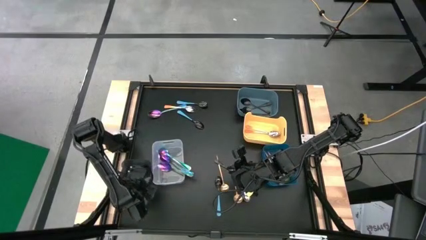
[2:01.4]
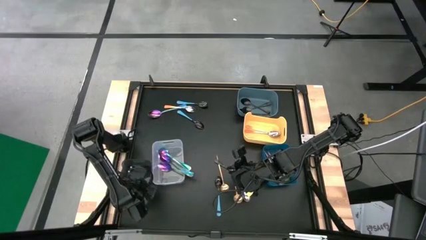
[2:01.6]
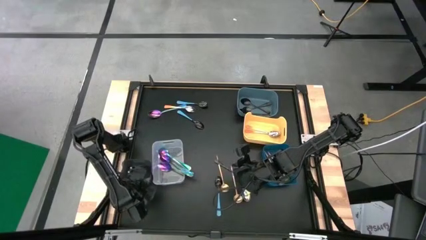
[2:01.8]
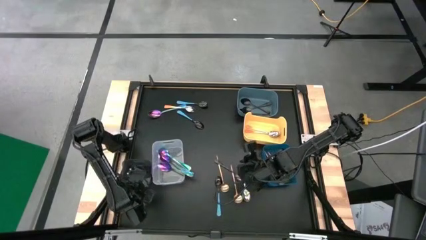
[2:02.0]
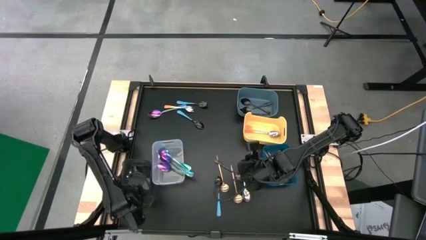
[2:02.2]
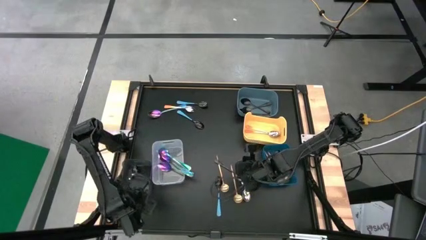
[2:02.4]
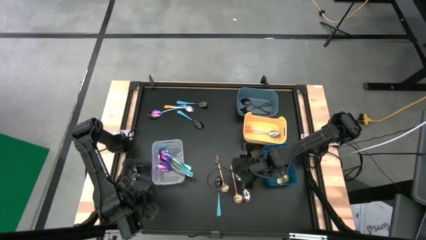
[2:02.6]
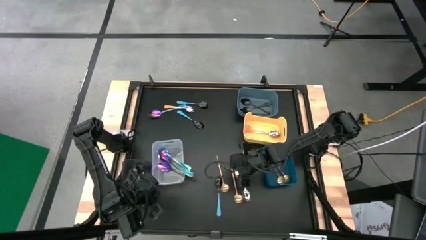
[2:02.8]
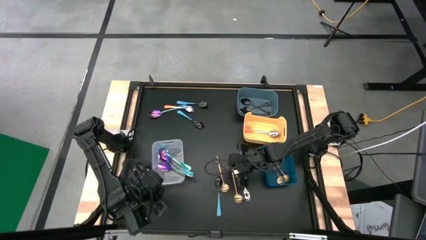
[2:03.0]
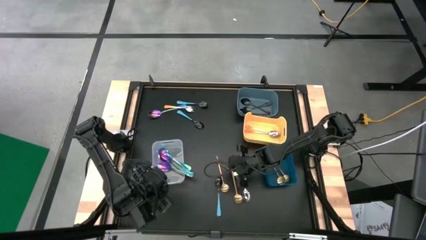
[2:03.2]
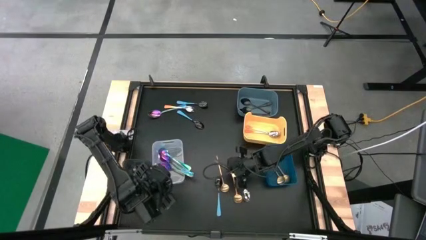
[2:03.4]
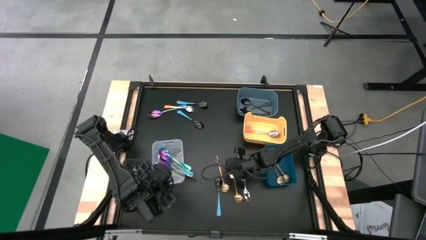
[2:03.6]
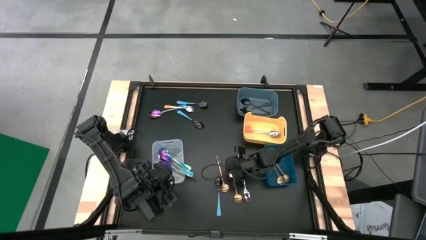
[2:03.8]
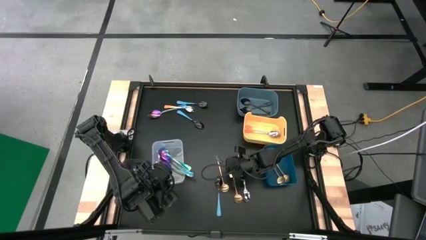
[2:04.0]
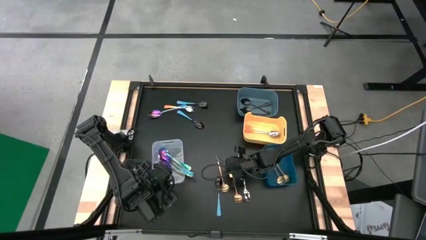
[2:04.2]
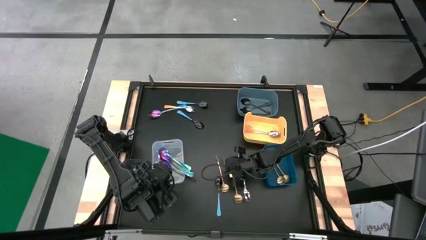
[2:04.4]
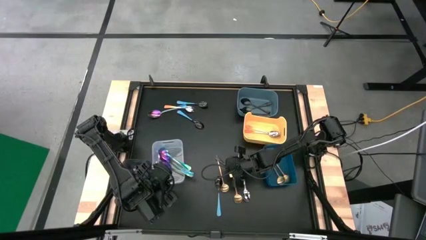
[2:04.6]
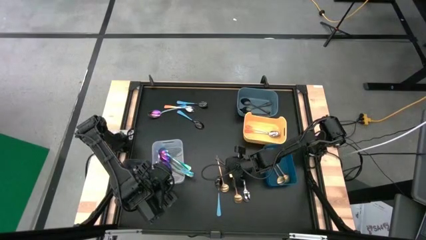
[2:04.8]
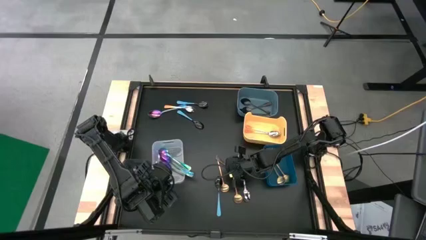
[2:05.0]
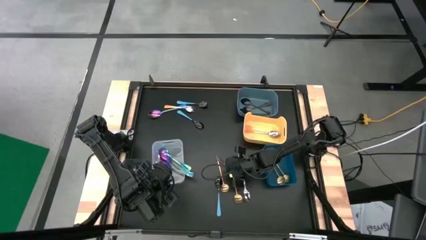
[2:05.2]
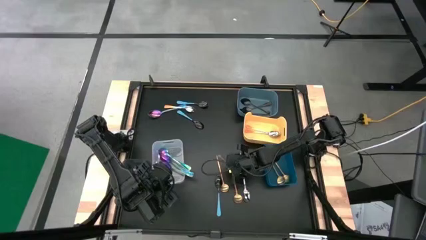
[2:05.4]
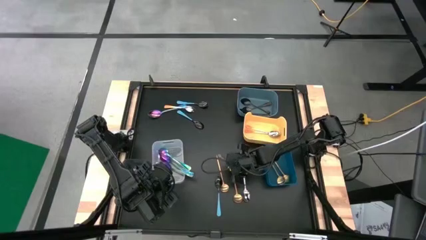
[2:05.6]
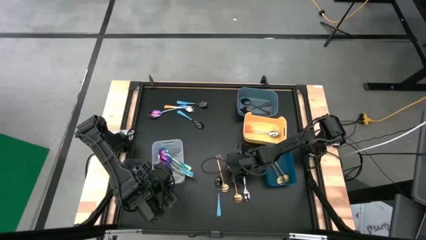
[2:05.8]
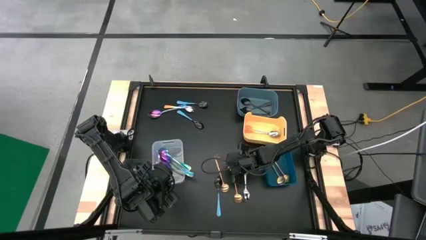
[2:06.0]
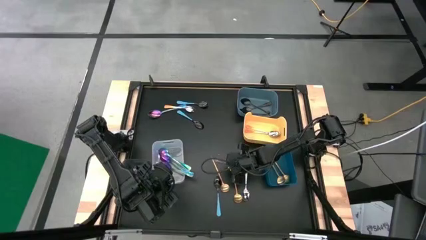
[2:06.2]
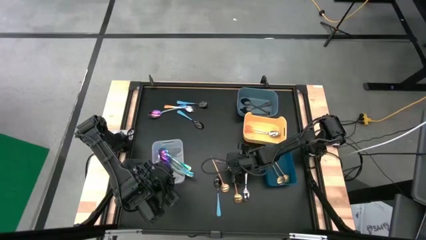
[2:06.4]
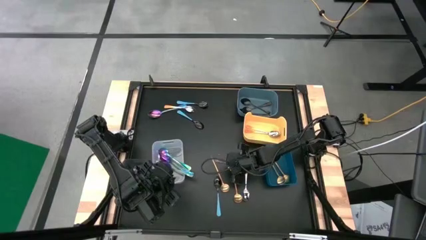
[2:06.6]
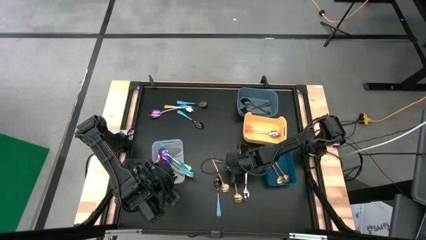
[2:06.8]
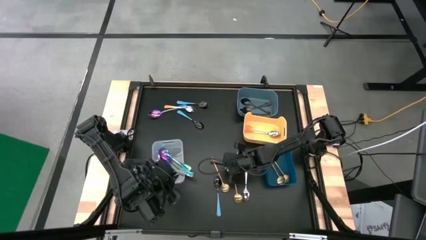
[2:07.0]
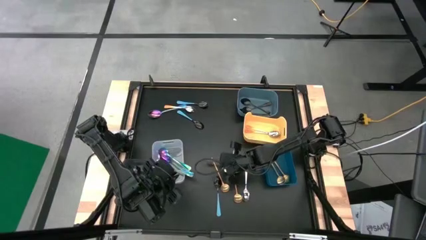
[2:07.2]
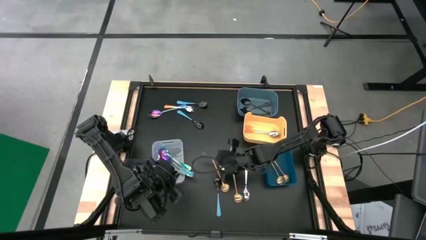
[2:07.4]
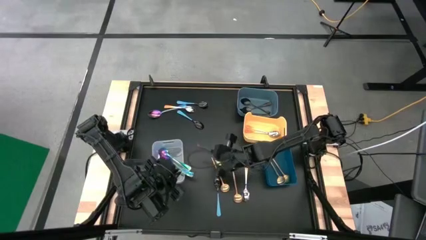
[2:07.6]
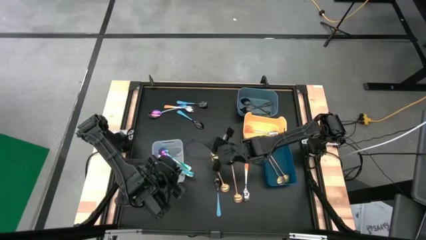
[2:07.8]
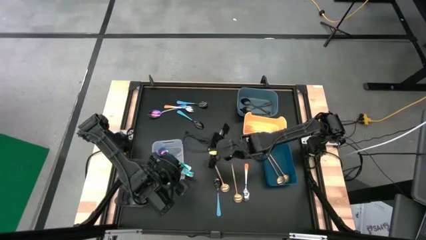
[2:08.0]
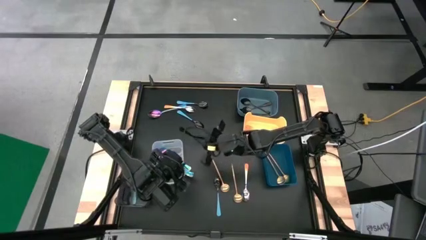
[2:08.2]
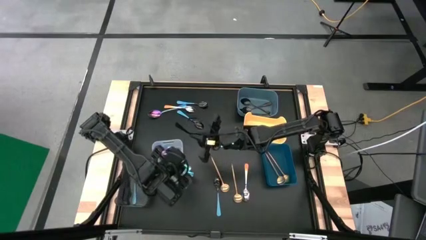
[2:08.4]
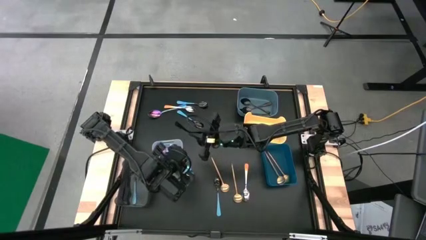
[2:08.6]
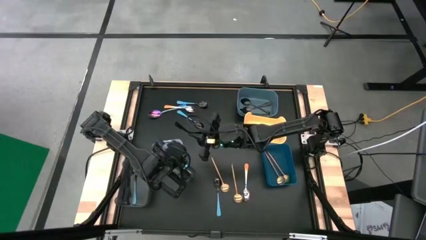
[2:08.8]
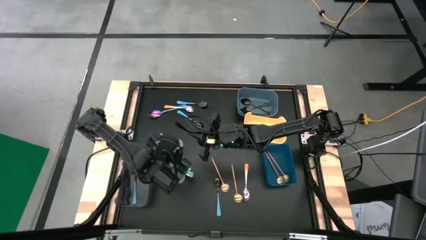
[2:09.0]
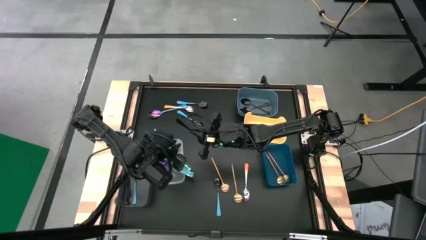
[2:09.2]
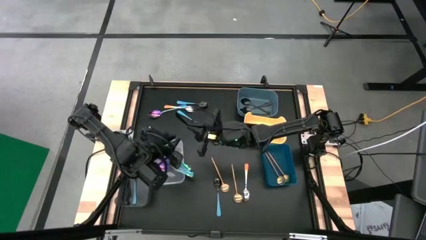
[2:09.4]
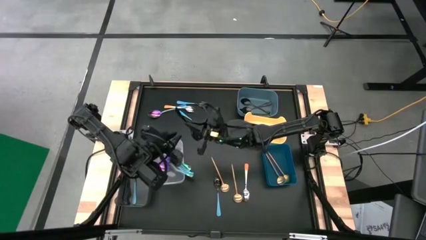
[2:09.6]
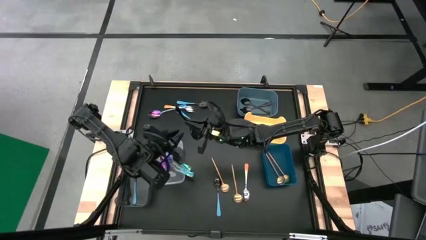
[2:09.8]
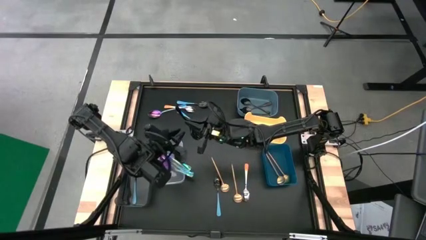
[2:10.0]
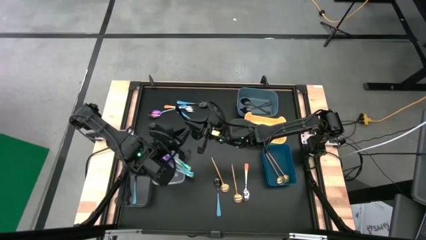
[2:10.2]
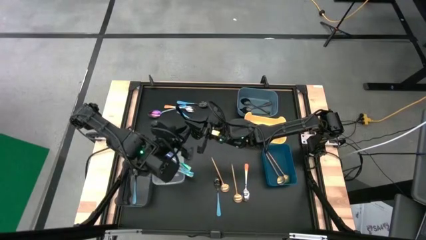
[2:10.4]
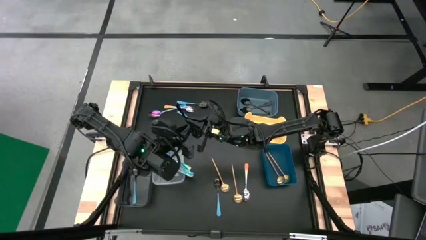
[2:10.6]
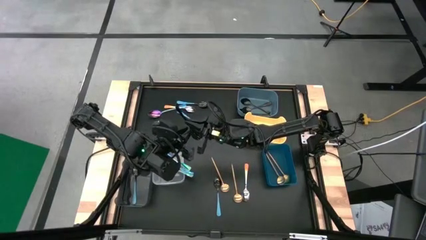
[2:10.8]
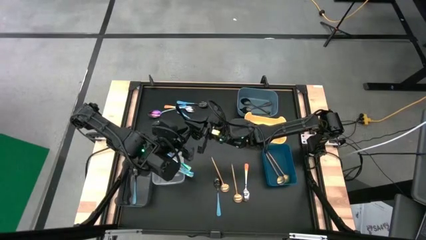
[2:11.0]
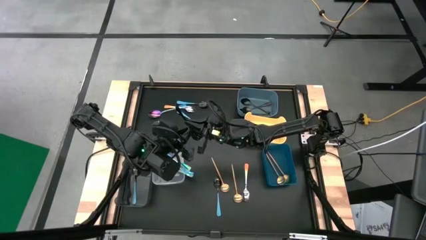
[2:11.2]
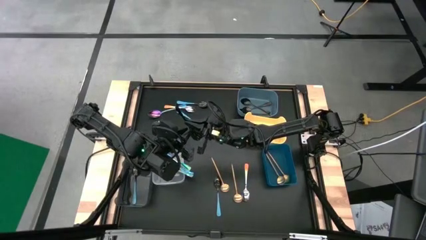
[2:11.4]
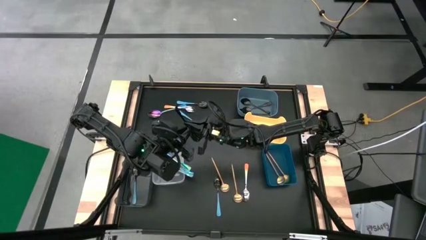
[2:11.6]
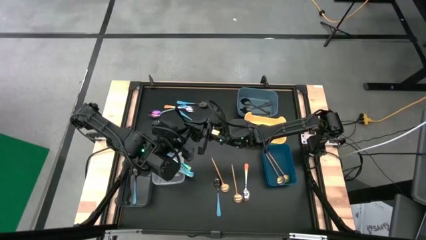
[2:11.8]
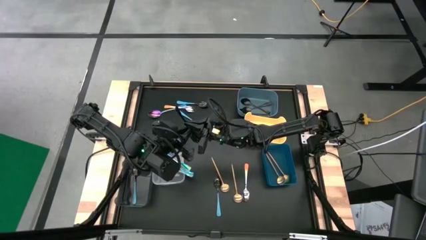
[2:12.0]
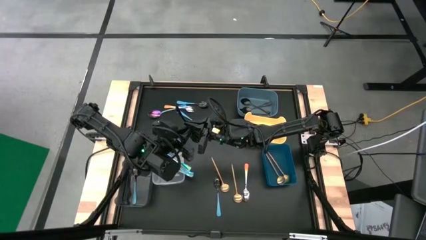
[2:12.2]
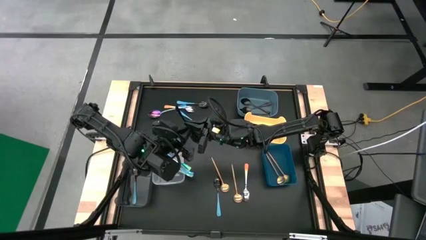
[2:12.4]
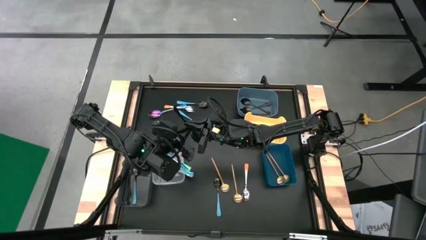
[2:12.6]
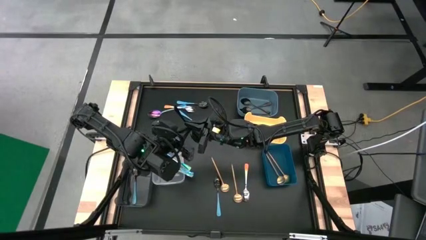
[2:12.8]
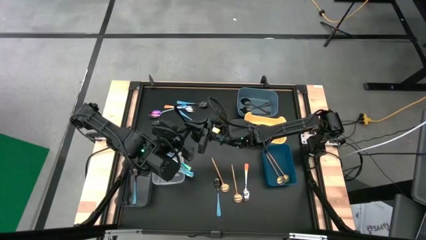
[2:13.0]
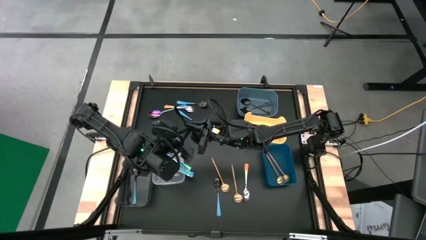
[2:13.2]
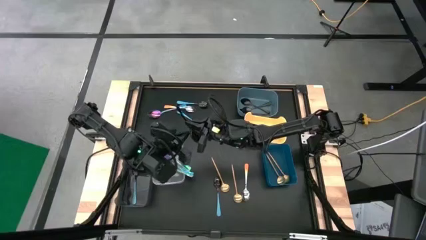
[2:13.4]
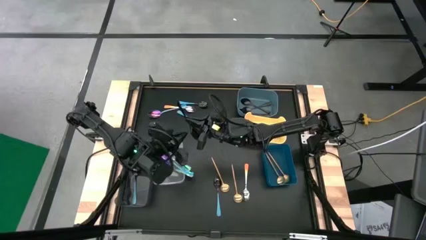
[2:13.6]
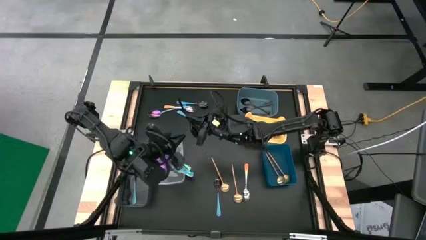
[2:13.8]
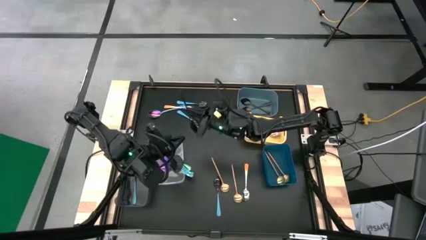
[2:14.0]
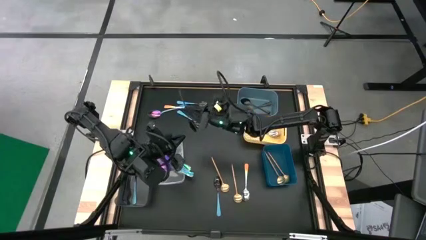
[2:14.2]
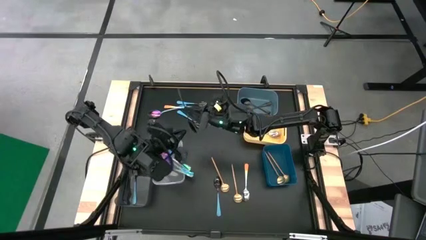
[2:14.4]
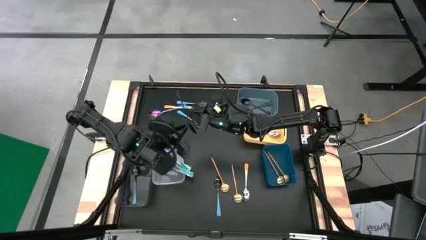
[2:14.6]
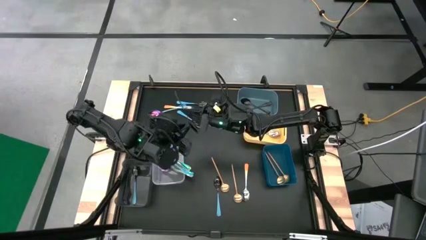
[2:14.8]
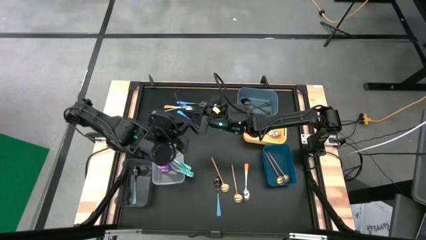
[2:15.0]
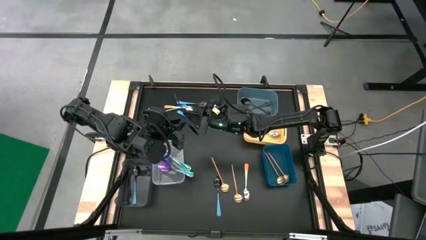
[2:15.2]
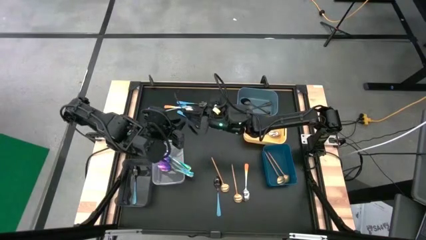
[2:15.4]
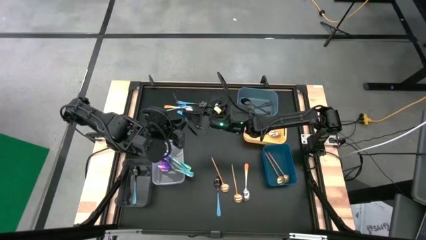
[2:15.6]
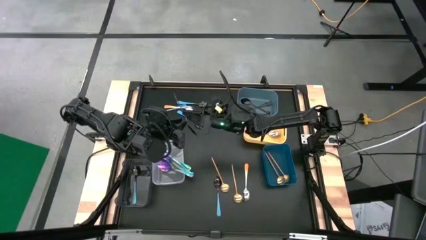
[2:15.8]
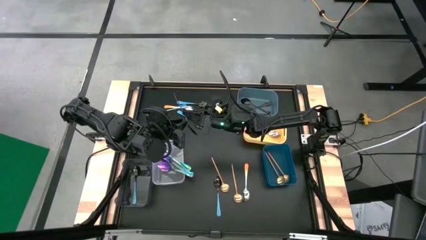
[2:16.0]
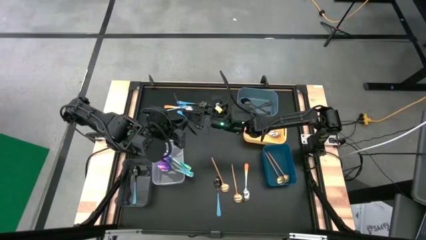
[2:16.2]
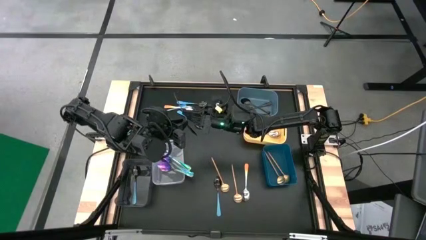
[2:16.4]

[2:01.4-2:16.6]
Task: Sort silverware by color (type)
Put the black spoon into the light blue bin
